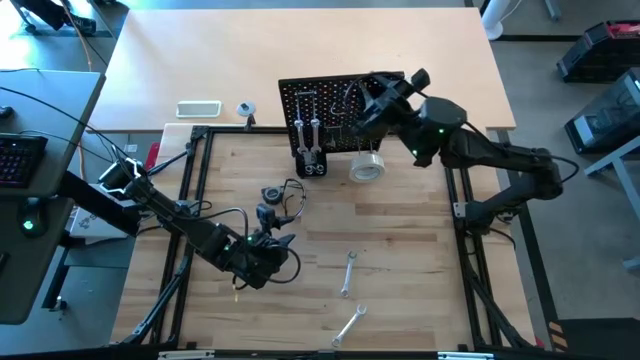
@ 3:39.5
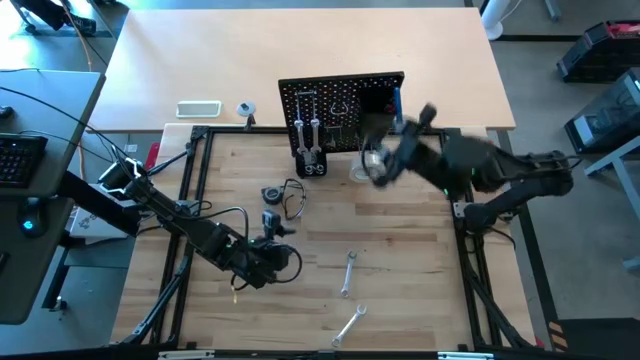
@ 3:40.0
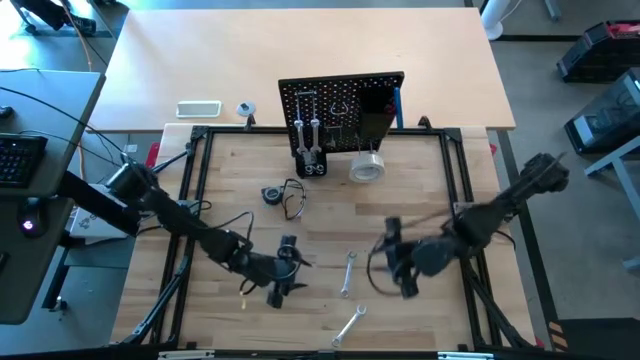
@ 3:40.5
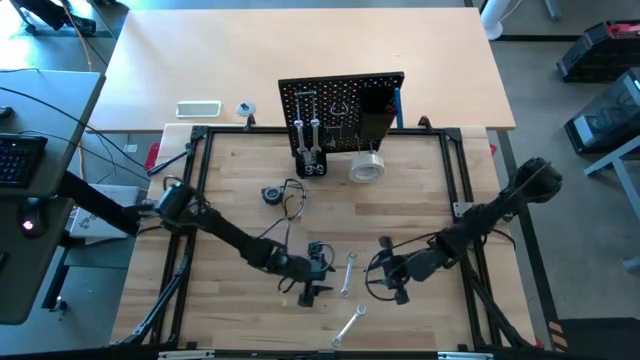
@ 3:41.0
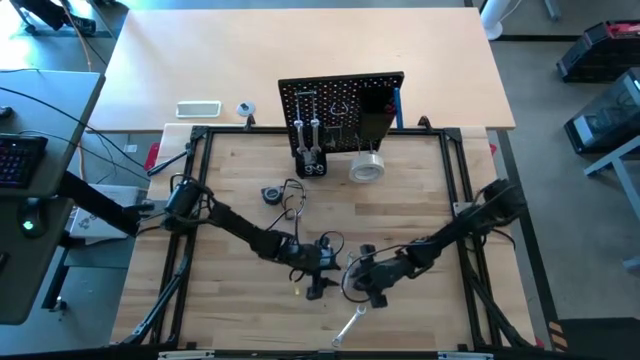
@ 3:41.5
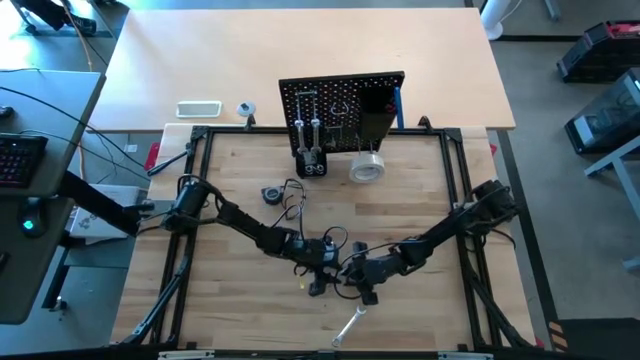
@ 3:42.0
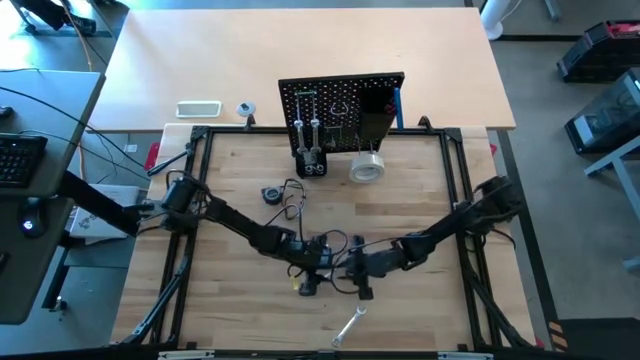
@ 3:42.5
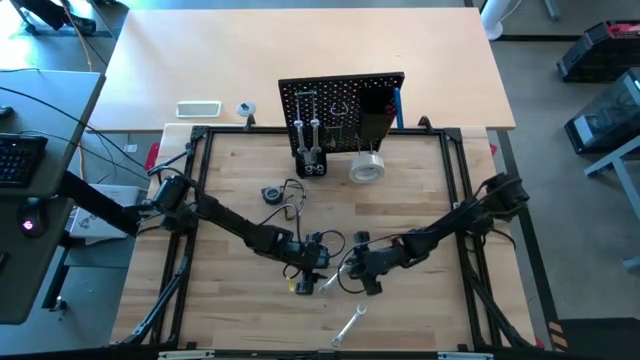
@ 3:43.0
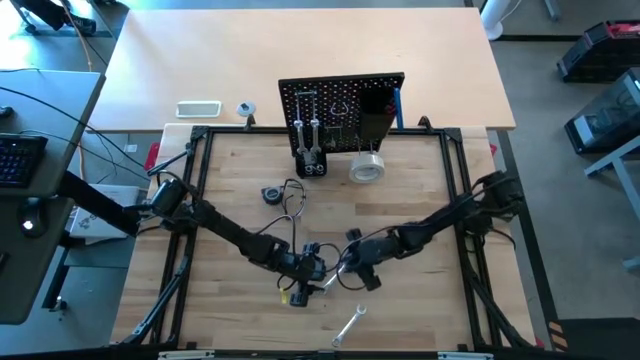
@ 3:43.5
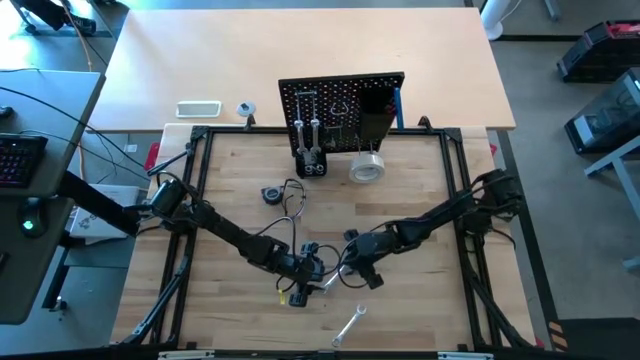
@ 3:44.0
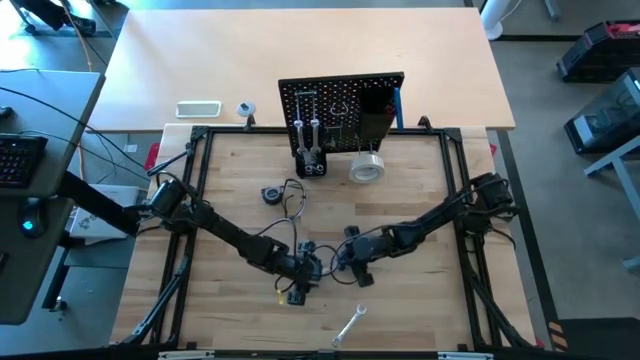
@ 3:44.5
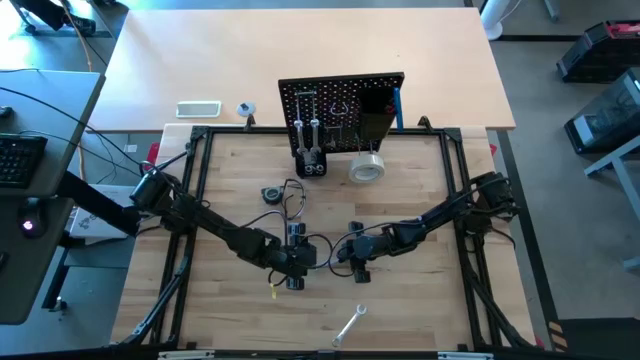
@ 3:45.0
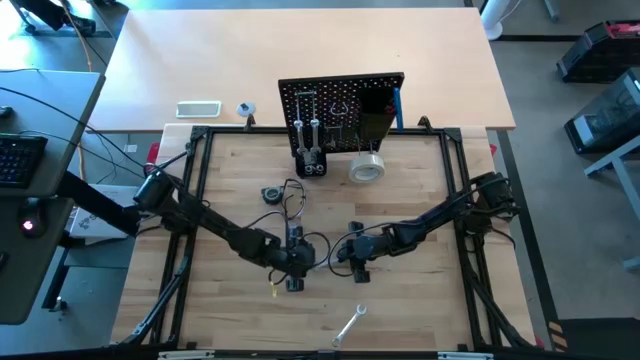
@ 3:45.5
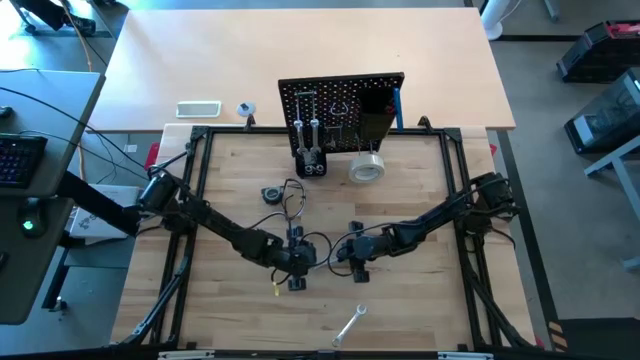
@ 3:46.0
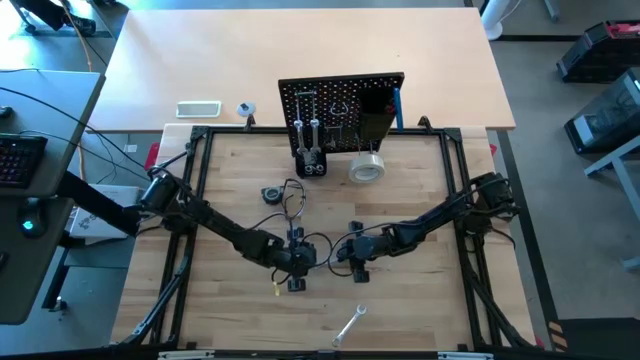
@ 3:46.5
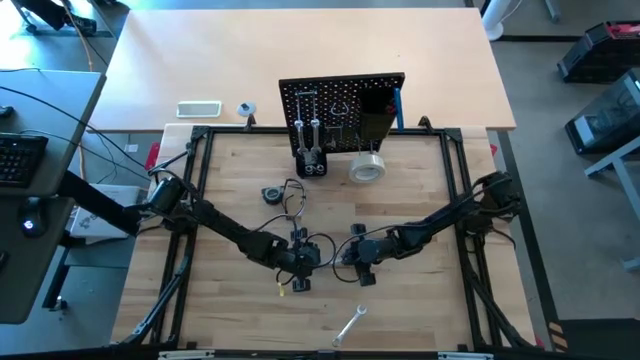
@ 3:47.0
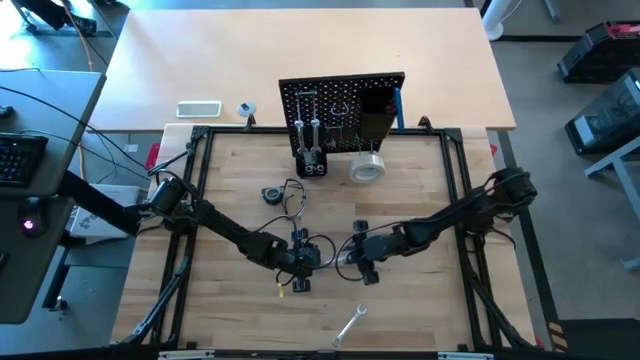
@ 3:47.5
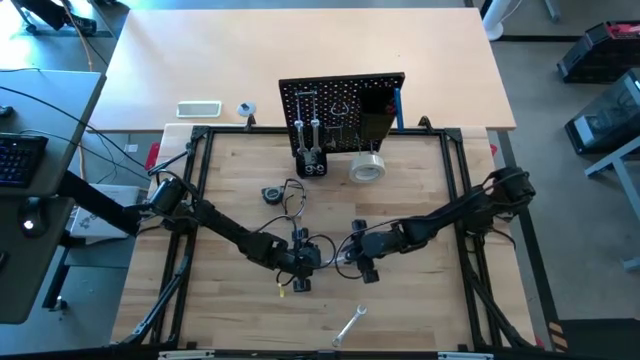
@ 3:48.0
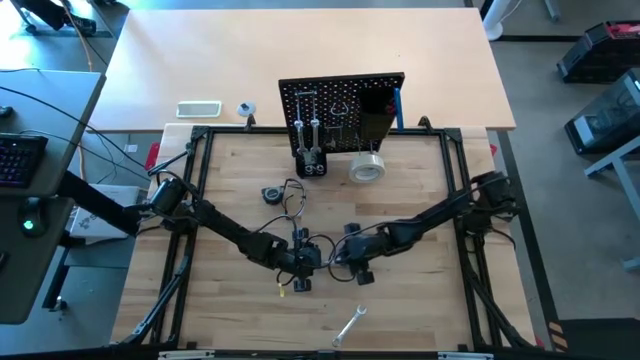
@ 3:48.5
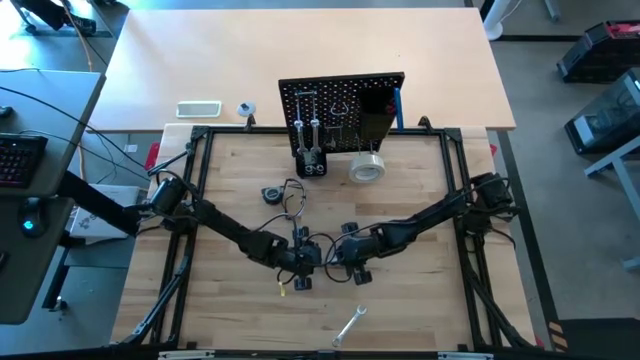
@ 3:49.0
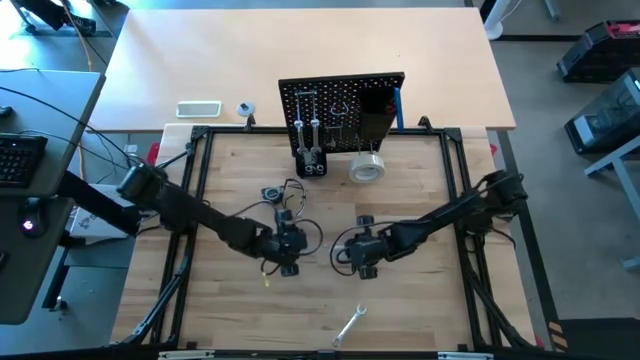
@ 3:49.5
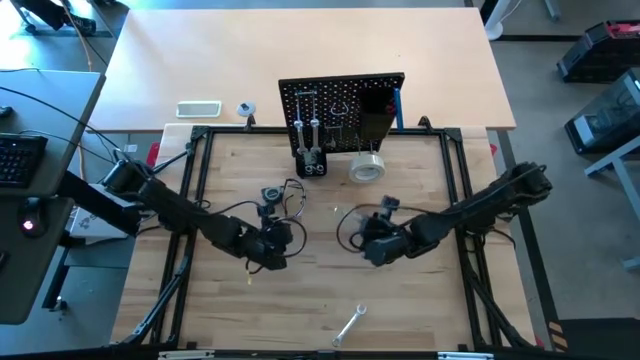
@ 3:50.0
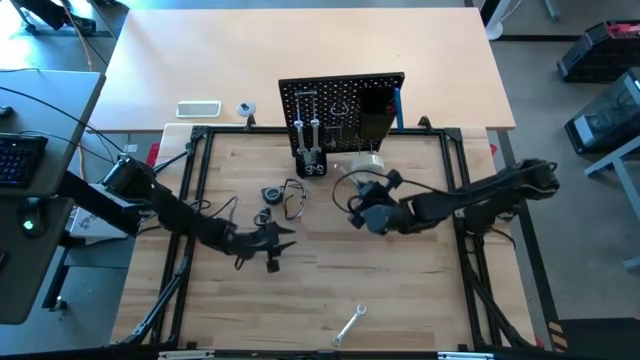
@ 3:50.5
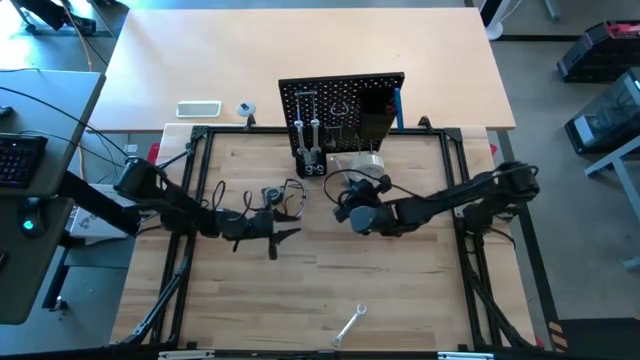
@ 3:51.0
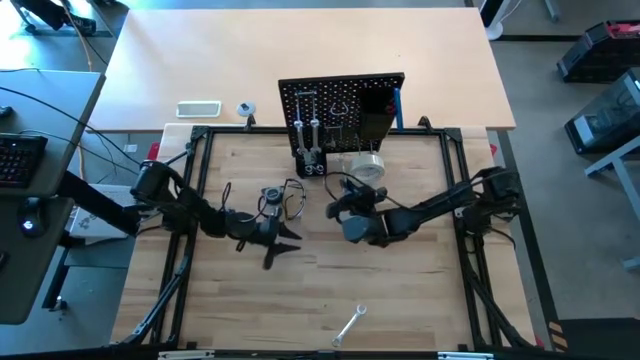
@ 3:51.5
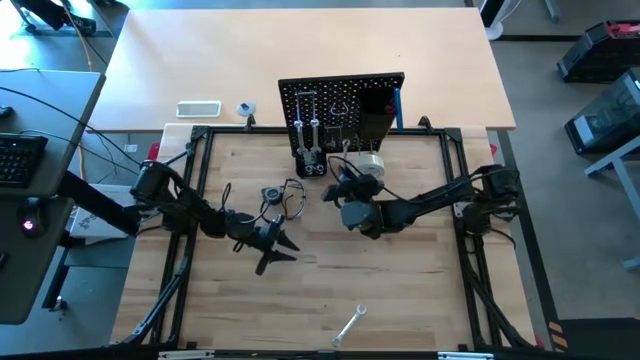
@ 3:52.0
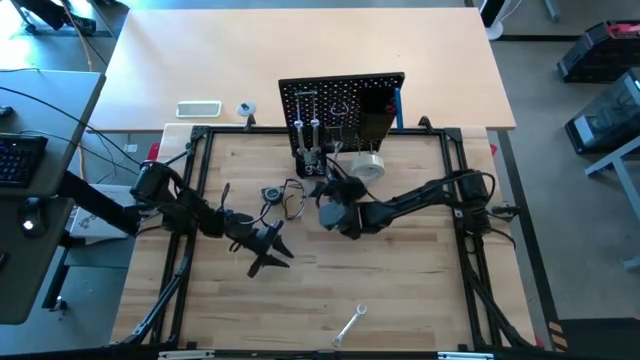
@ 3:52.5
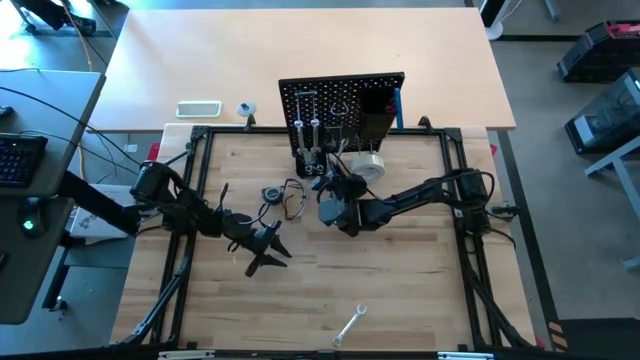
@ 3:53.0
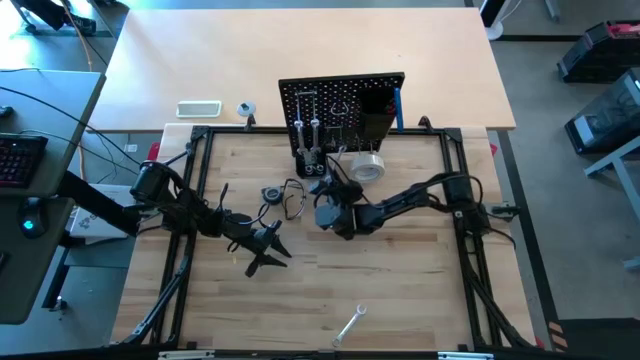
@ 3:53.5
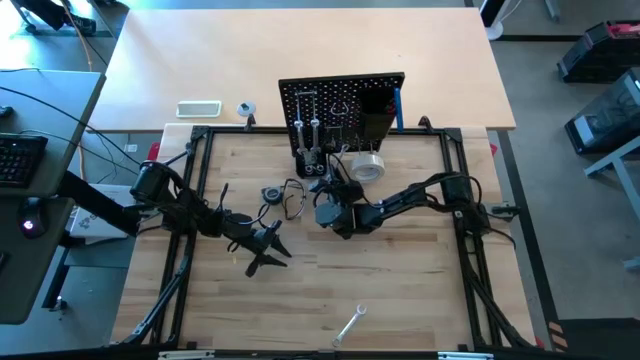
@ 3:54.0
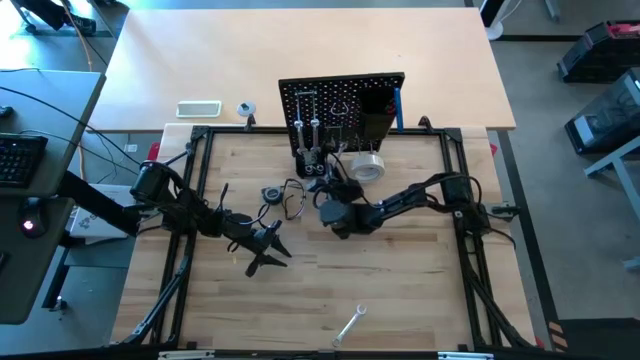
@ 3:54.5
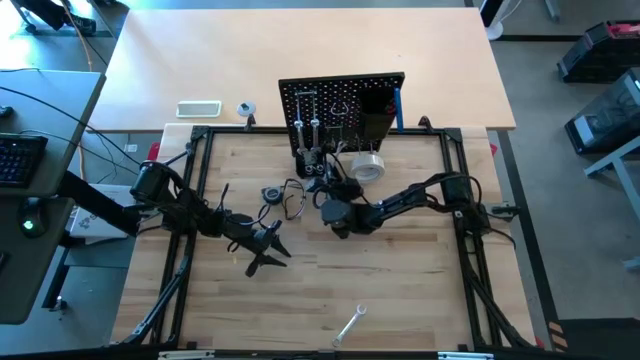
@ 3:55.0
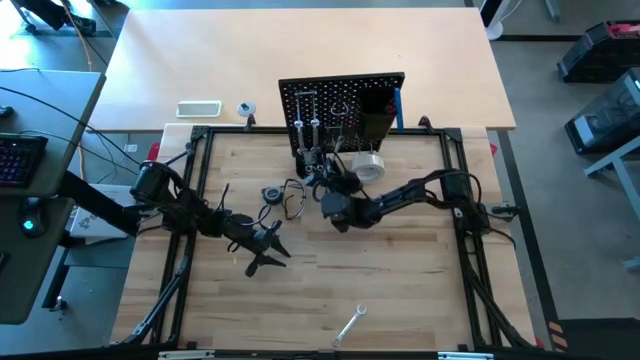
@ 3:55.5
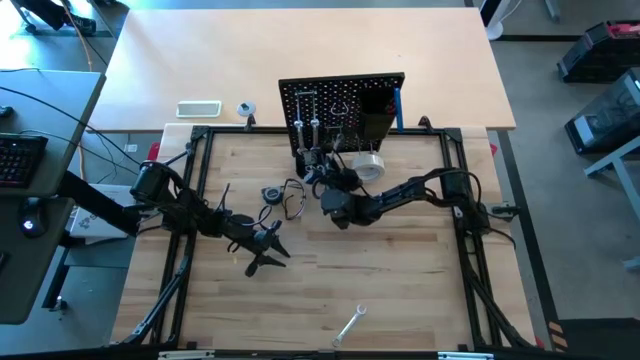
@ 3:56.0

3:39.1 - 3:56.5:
Task: Hang tools onto peg board
Hang the top wrench on the pegboard

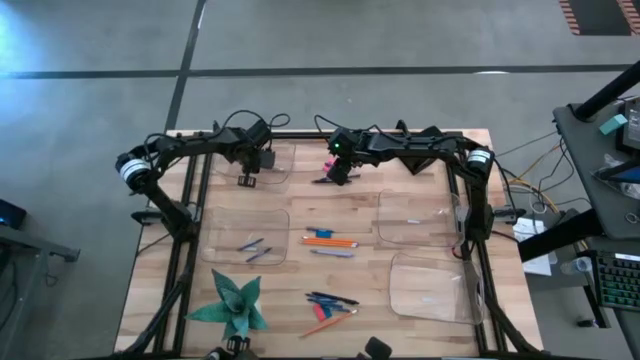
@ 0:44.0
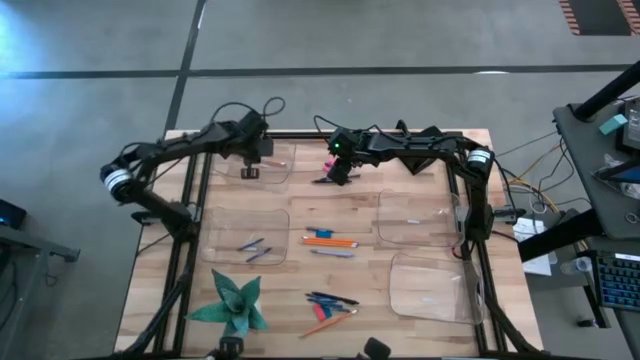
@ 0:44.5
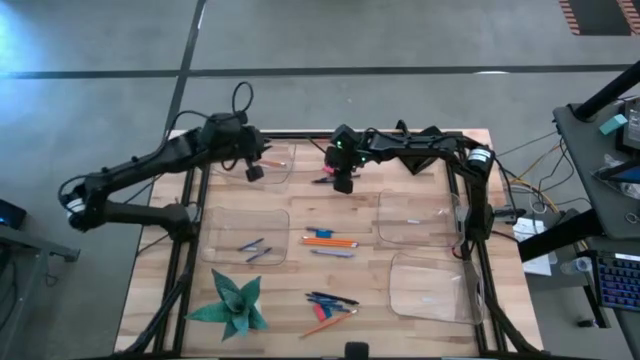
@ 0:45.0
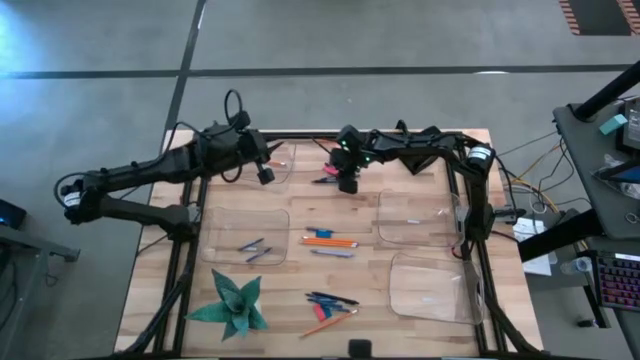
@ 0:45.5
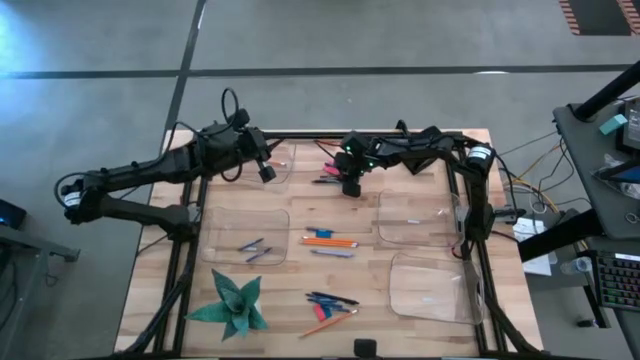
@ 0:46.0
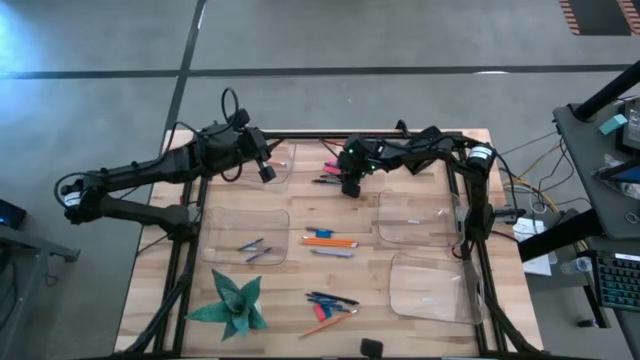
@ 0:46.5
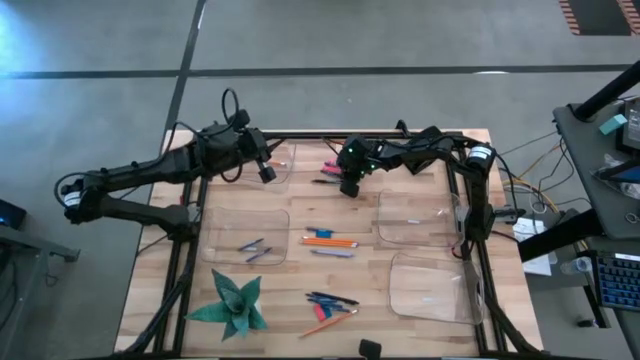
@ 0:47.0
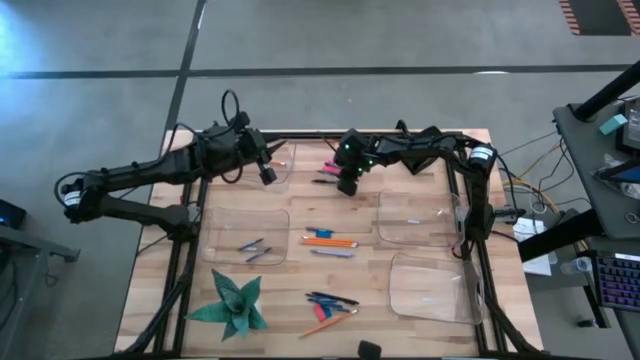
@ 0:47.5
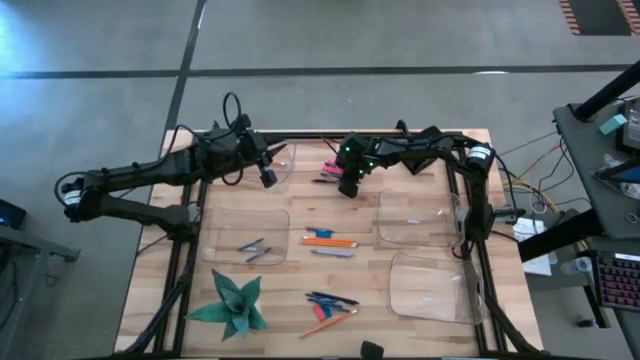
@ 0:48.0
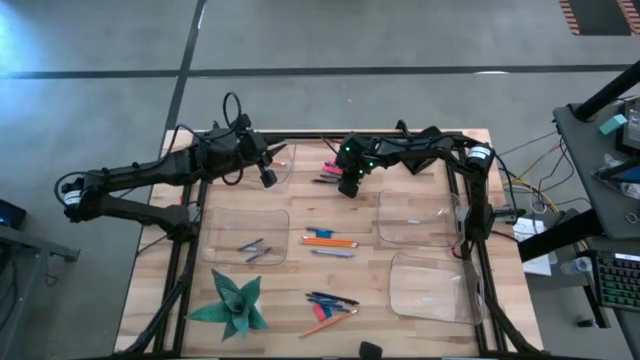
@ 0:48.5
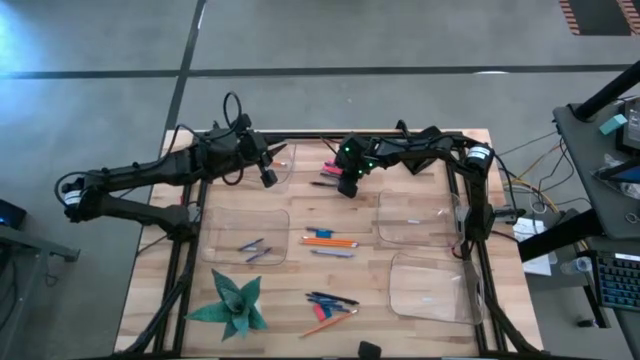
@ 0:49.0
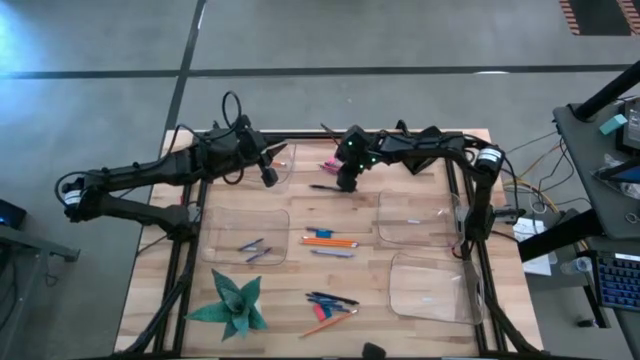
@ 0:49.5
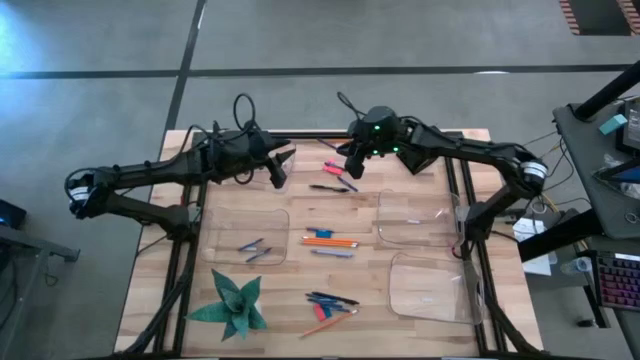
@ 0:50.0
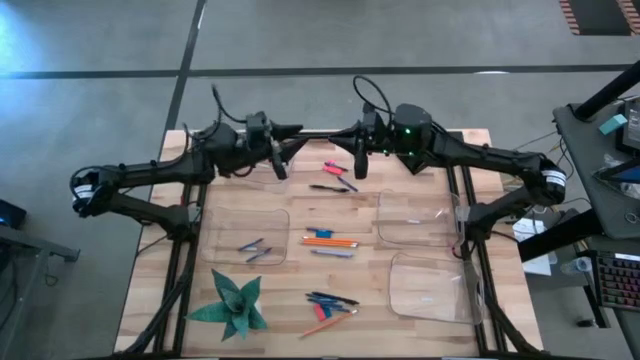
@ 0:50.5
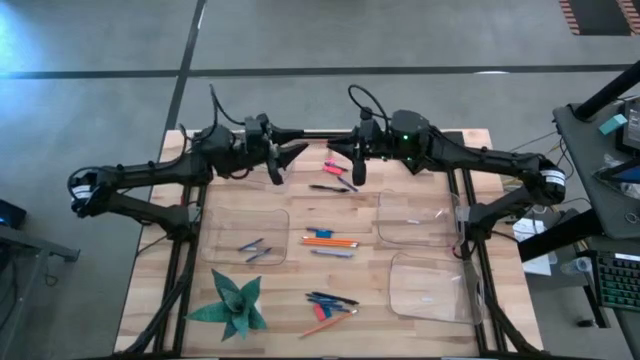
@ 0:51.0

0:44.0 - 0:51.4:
Task: Sort crayons/erasers/pens/pencils in bins
Put the blue crayon into the middle left transparent bin
